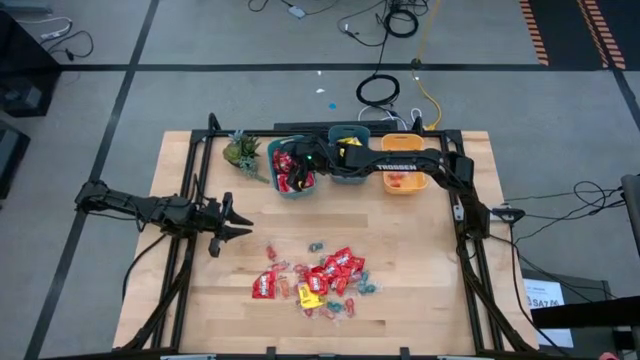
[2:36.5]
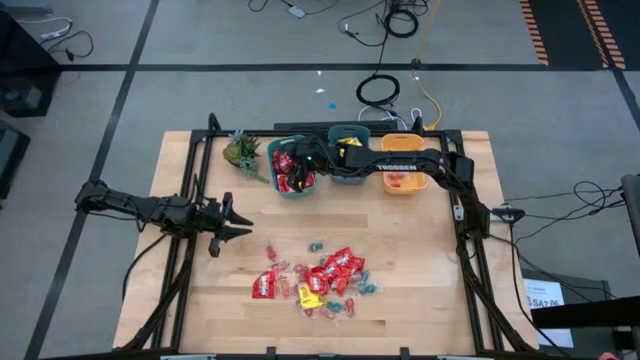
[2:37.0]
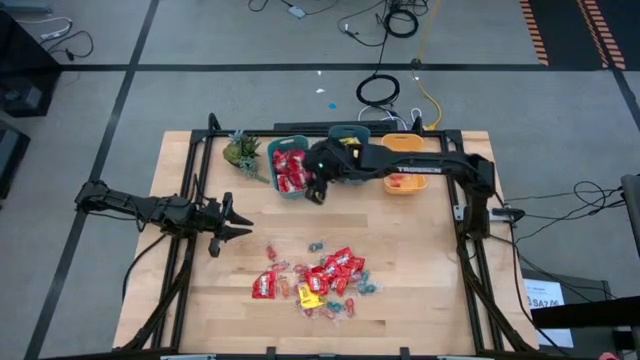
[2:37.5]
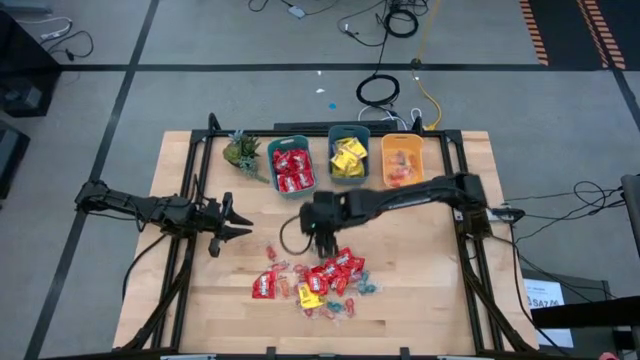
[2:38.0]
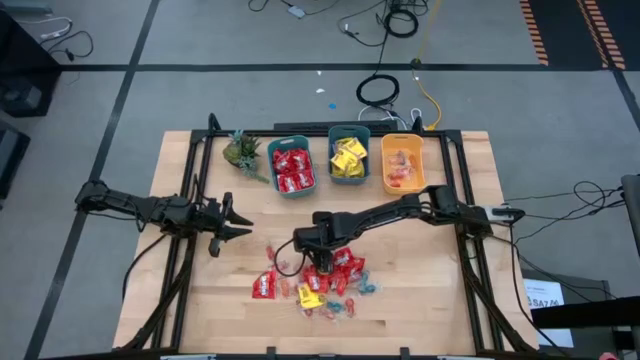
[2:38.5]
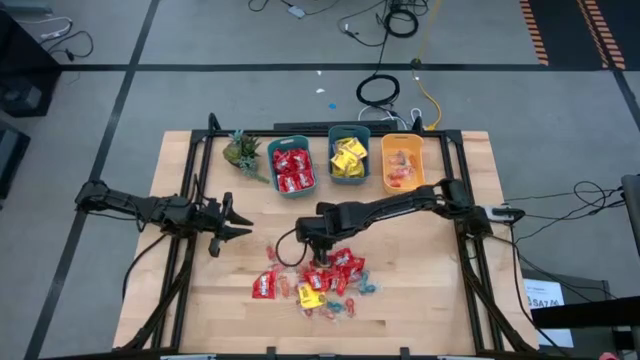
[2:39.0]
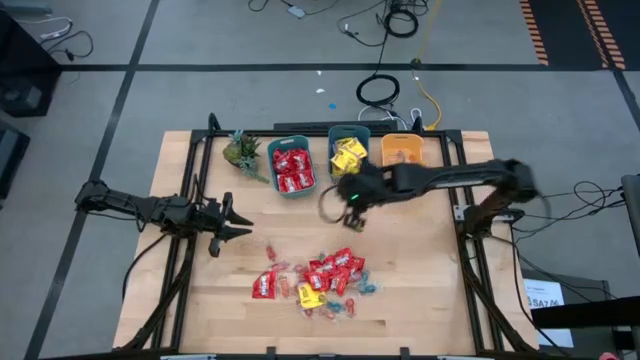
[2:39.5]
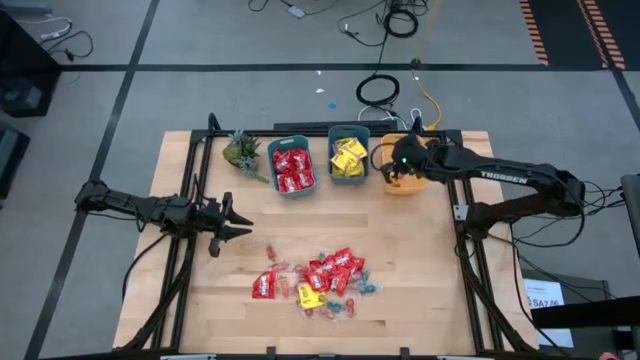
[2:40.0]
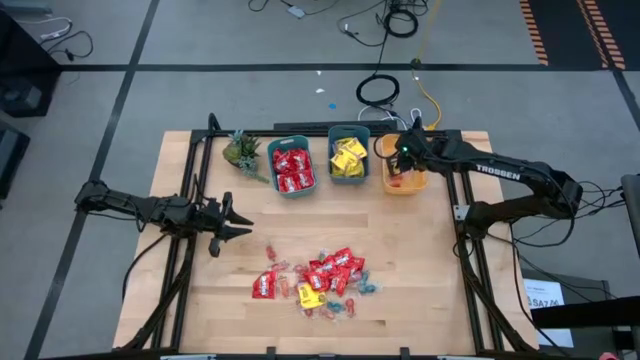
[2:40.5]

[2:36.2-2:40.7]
Task: Sort candy
Put the blue gummy candy into the yellow bin

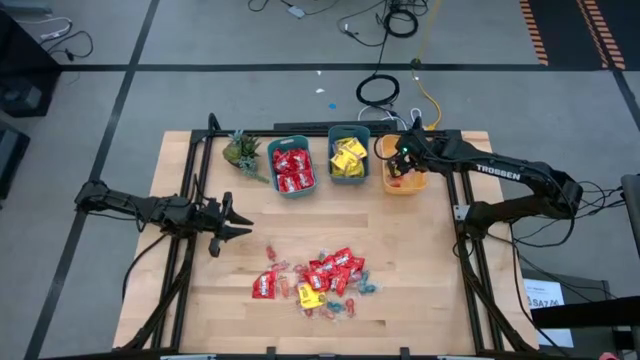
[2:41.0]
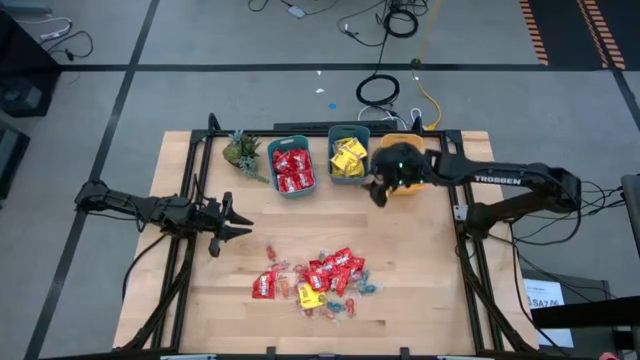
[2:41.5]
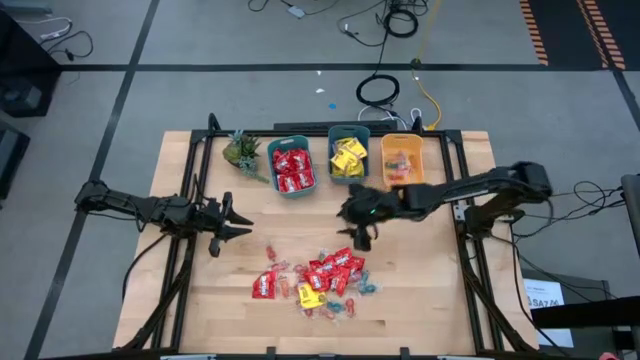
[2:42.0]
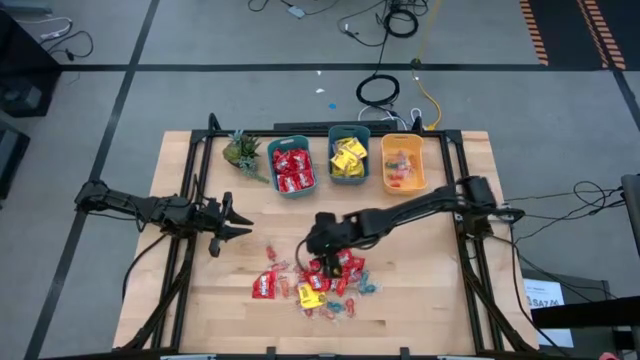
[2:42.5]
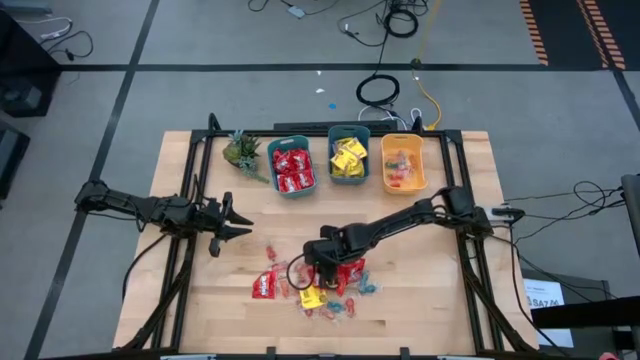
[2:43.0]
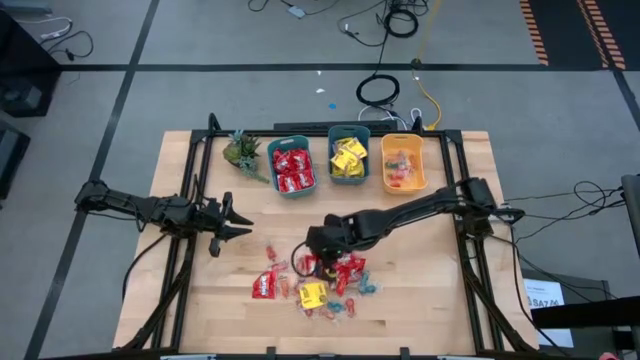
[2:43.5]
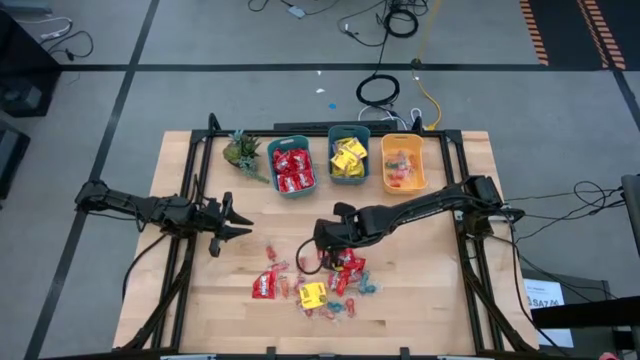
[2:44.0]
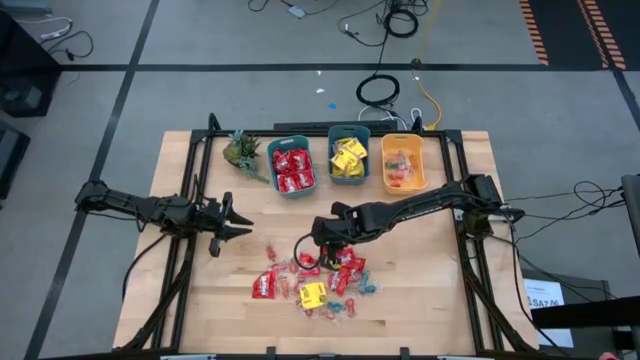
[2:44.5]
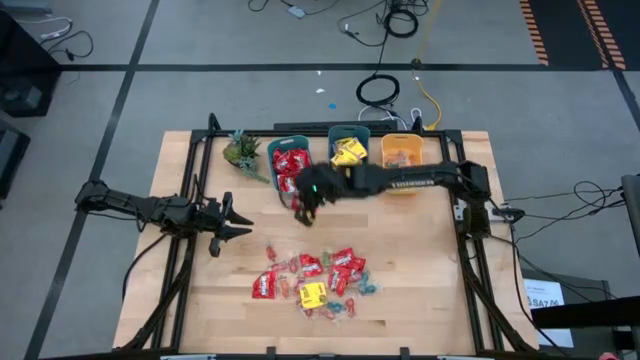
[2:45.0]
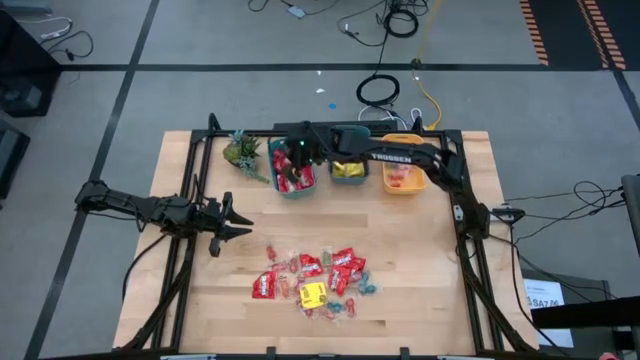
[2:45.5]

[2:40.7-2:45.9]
Put the red candy into the green bin

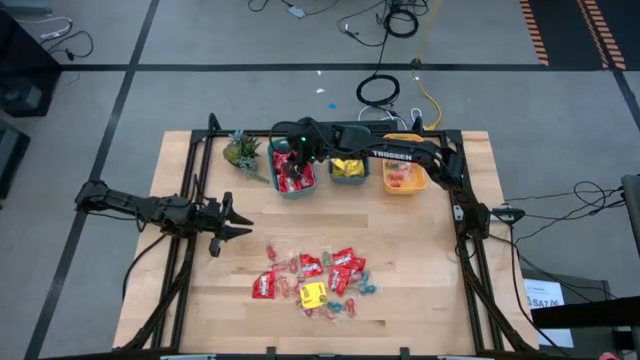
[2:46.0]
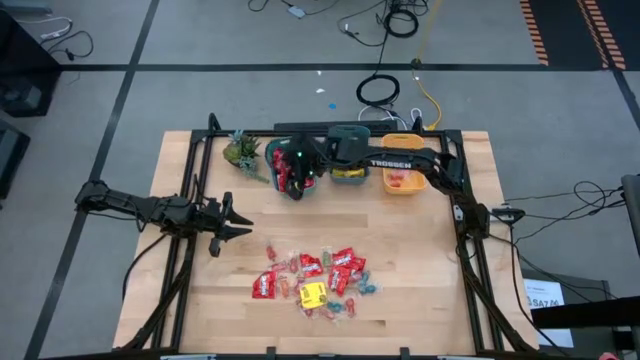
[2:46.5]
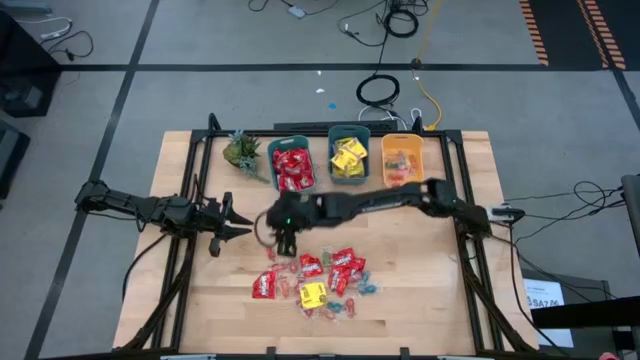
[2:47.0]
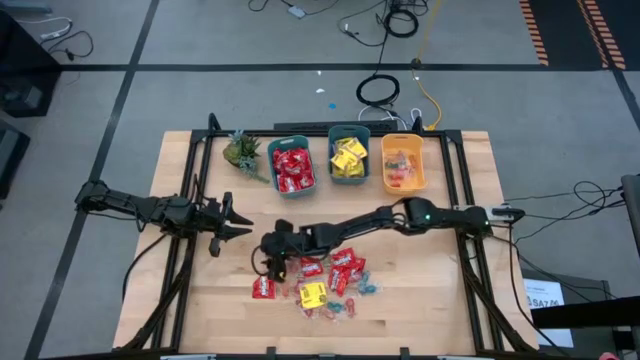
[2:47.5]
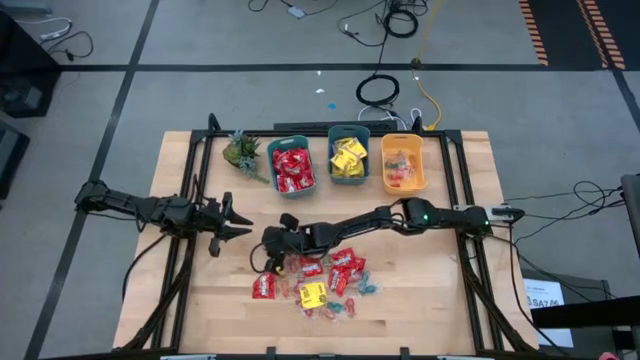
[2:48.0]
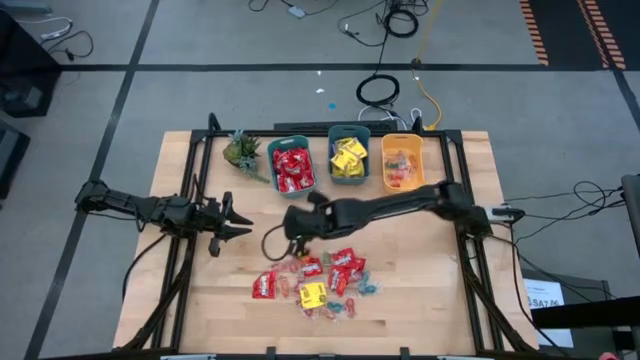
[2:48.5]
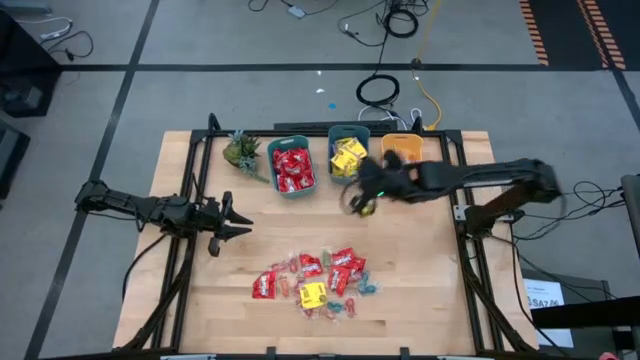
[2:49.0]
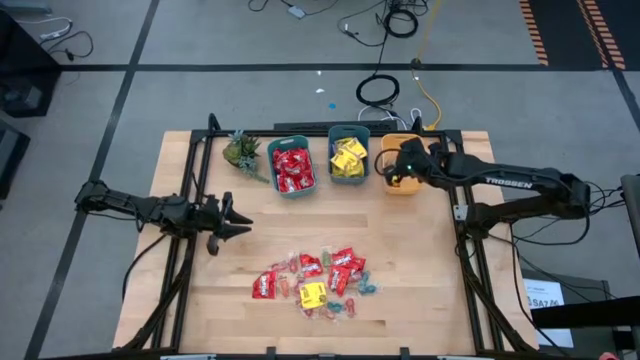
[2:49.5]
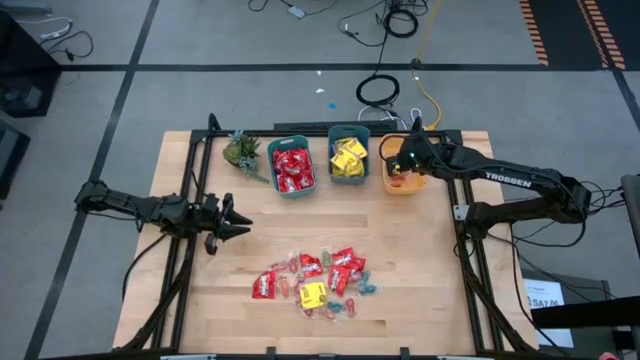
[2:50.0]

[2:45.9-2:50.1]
Put the red gummy candy into the yellow bin

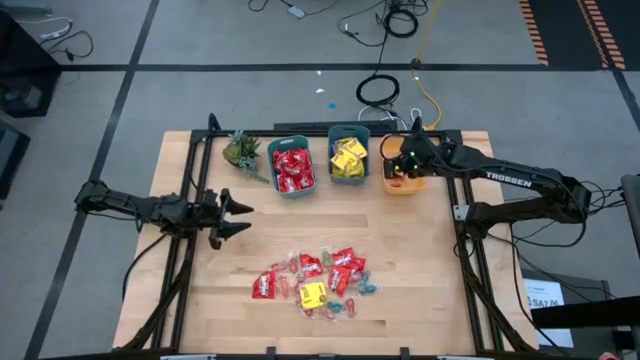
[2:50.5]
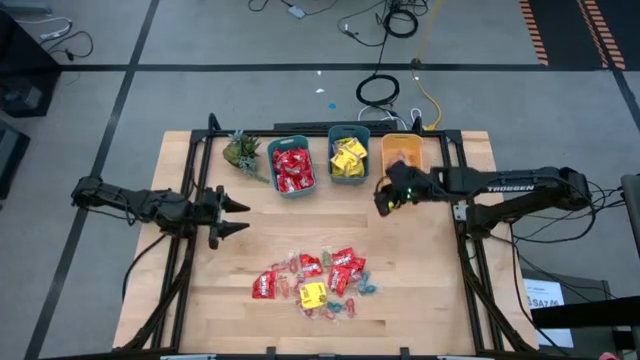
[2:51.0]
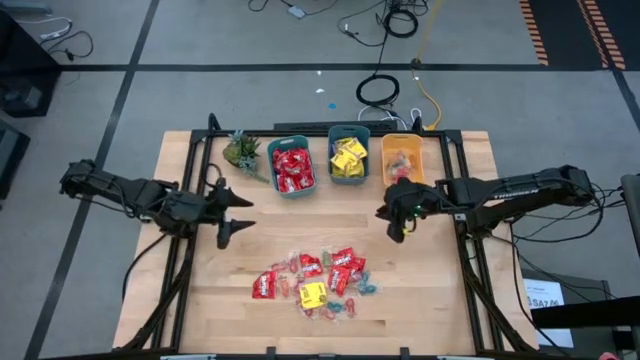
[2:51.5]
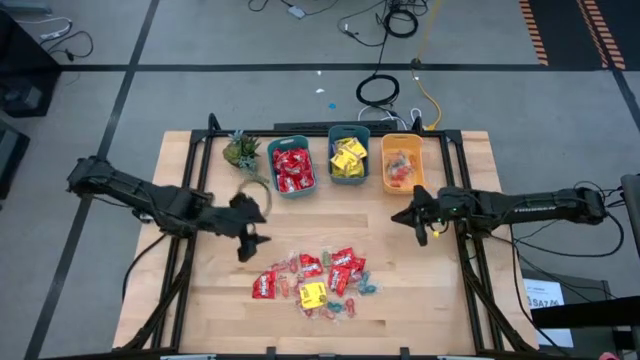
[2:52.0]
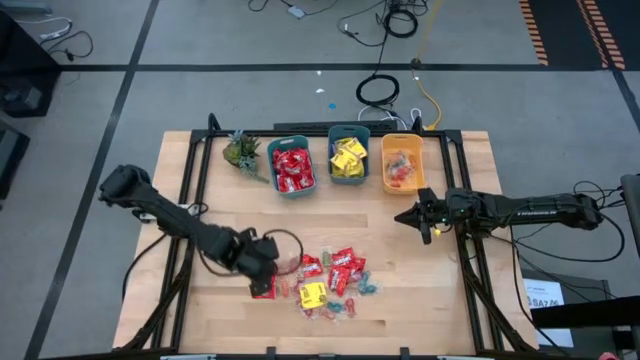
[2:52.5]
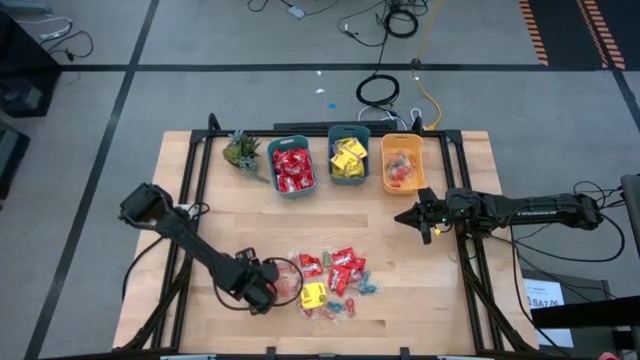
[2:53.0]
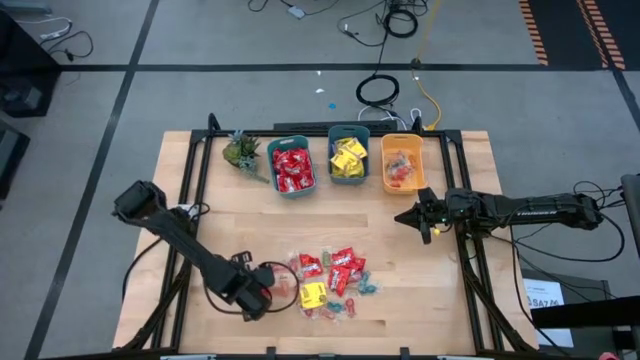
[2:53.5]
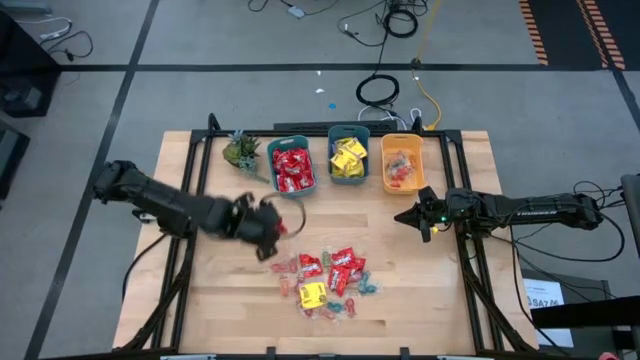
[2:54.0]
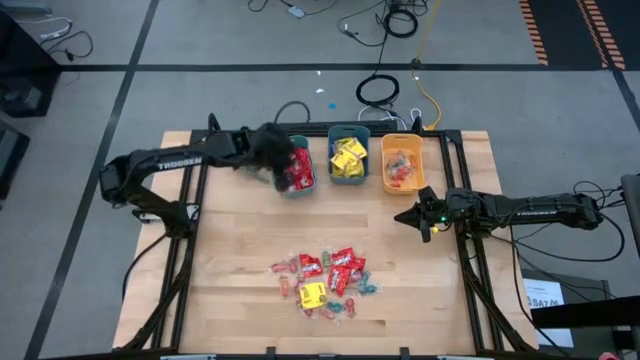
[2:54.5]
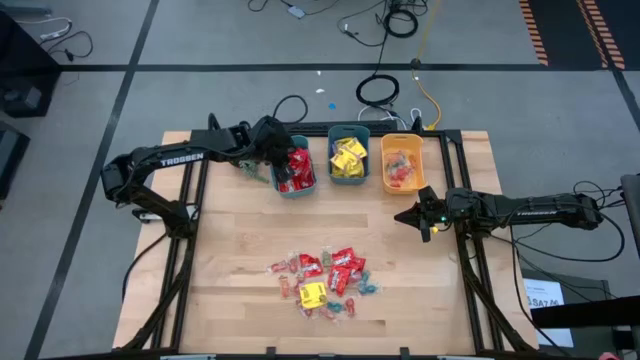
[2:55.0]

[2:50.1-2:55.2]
Put the red candy into the green bin

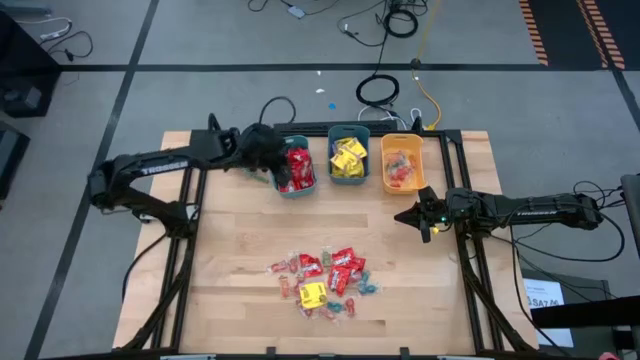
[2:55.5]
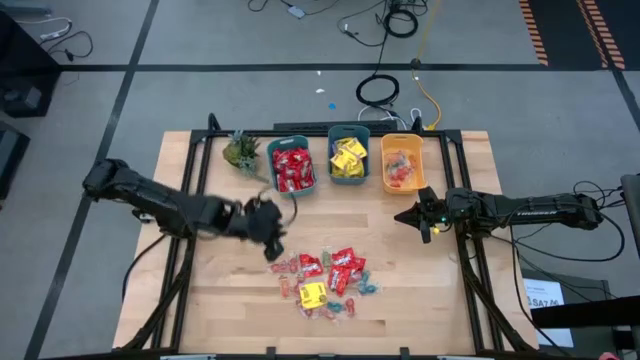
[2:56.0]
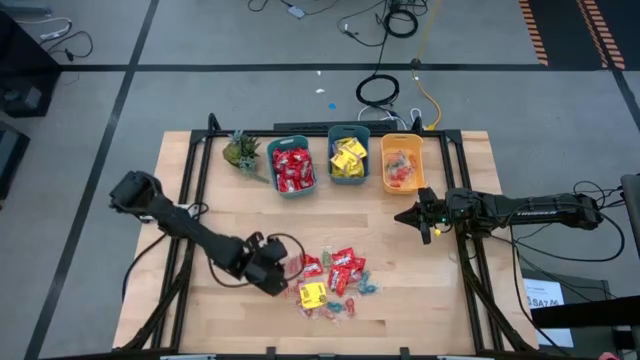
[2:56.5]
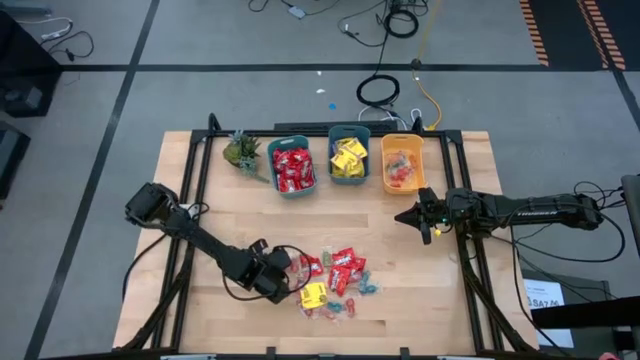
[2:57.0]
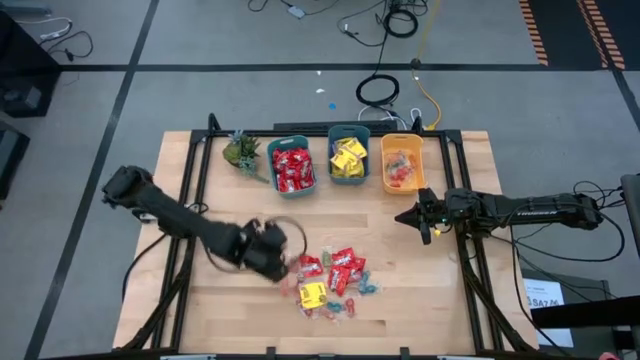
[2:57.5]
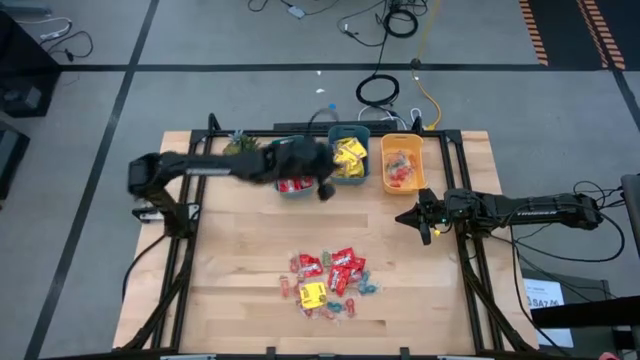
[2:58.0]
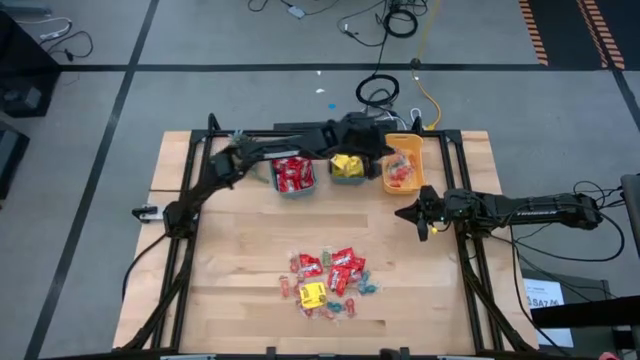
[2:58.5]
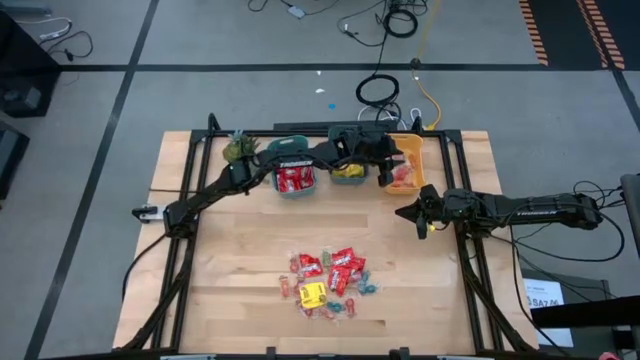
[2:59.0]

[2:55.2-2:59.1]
Put the red gummy candy into the yellow bin
